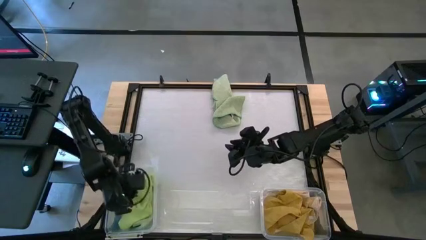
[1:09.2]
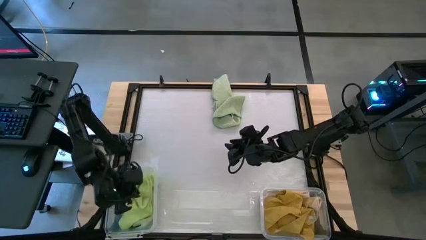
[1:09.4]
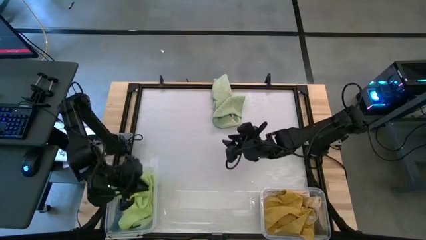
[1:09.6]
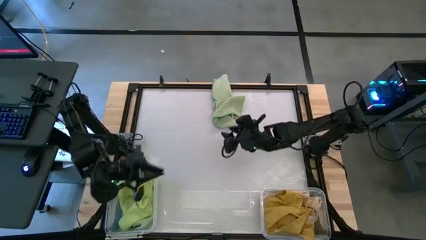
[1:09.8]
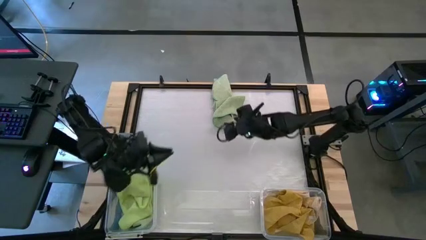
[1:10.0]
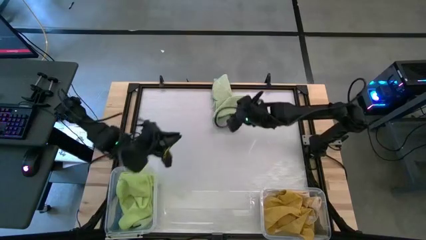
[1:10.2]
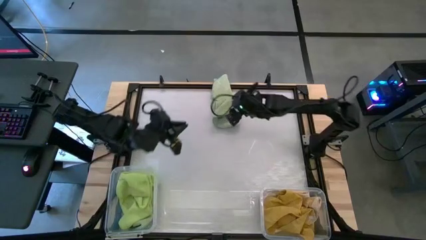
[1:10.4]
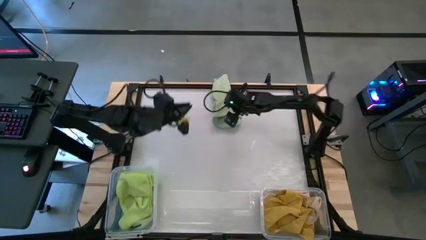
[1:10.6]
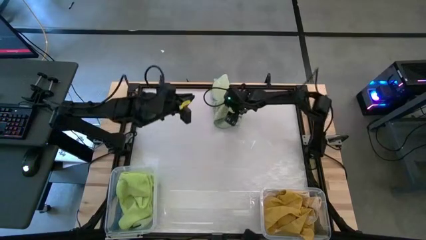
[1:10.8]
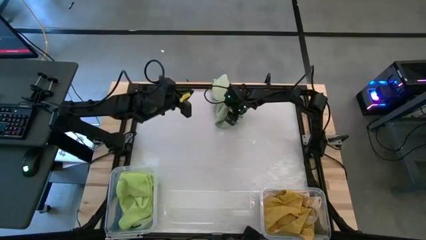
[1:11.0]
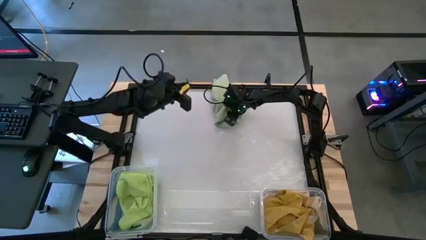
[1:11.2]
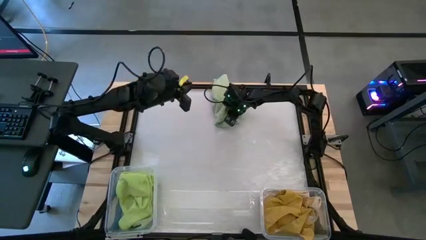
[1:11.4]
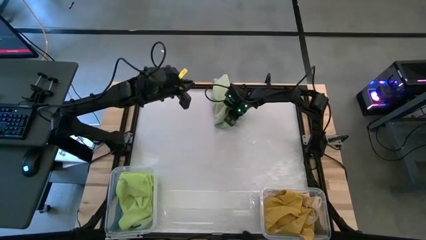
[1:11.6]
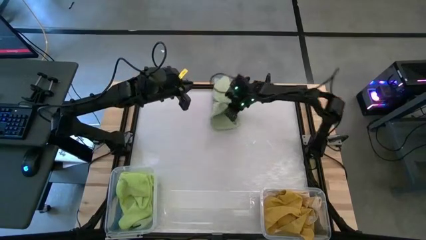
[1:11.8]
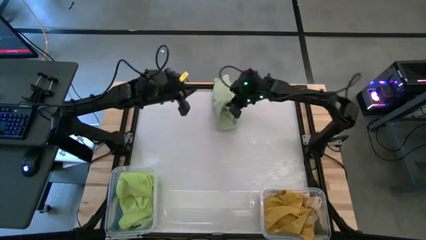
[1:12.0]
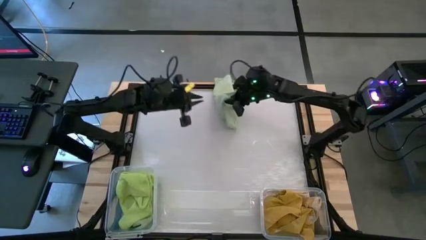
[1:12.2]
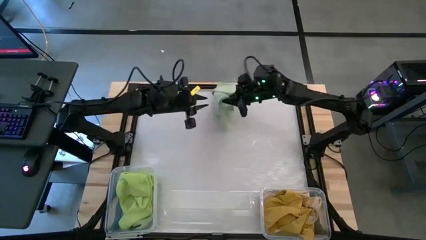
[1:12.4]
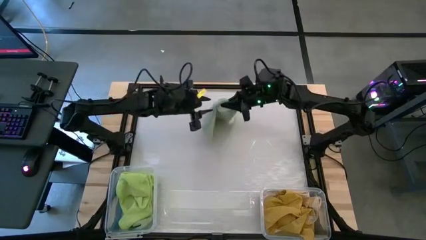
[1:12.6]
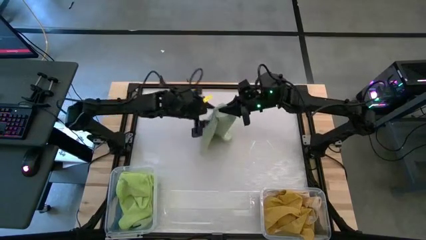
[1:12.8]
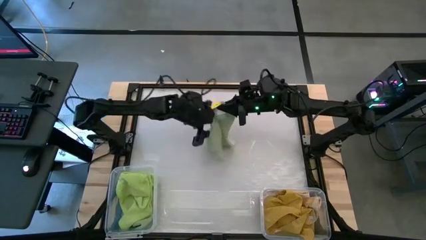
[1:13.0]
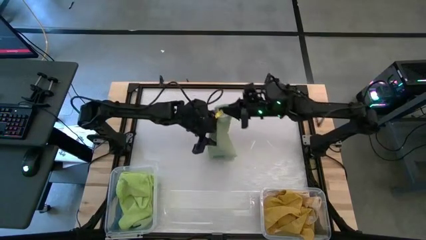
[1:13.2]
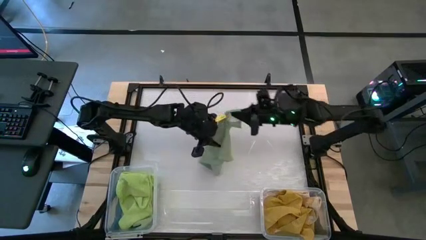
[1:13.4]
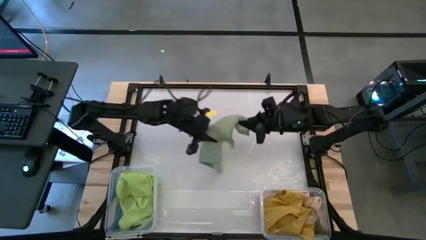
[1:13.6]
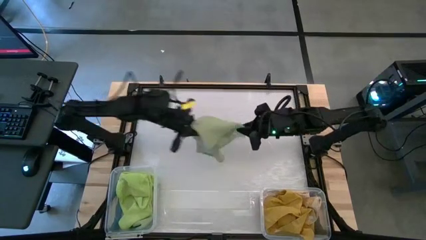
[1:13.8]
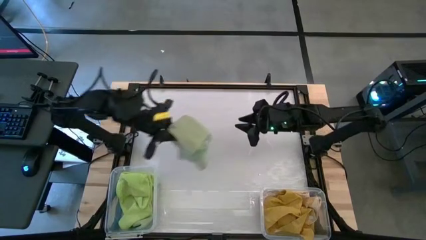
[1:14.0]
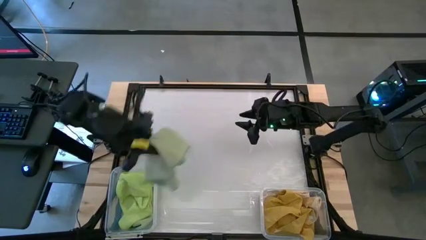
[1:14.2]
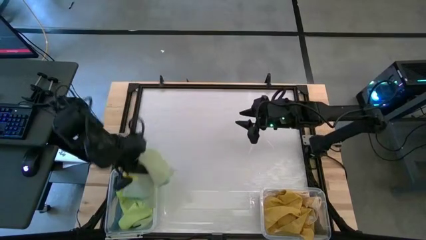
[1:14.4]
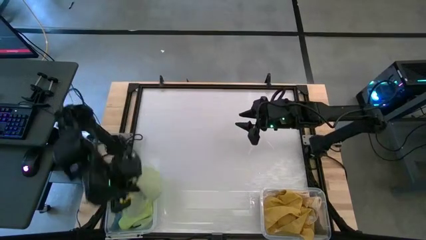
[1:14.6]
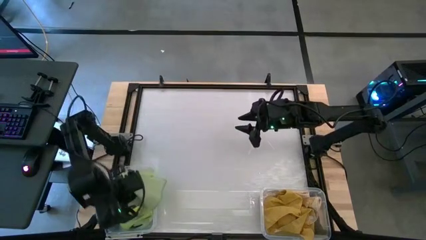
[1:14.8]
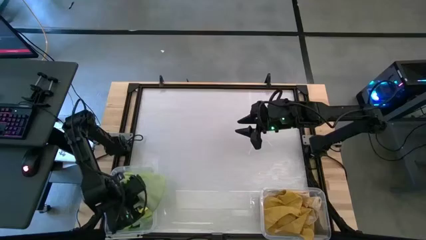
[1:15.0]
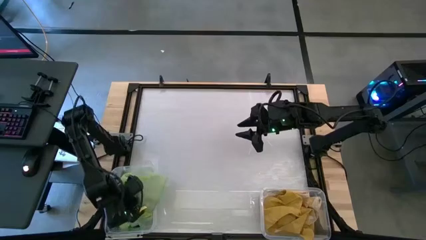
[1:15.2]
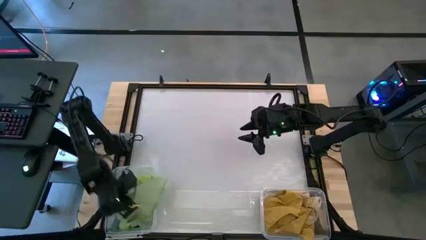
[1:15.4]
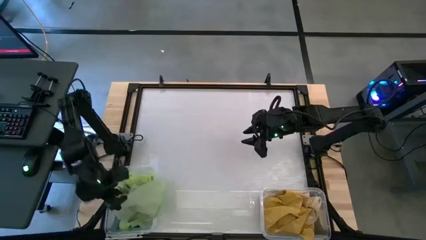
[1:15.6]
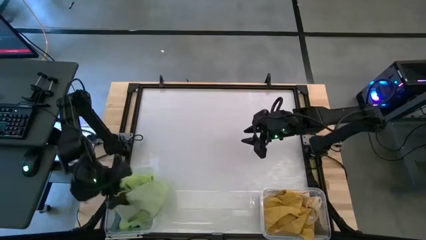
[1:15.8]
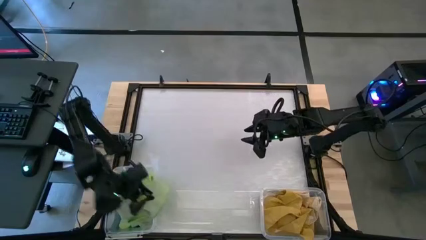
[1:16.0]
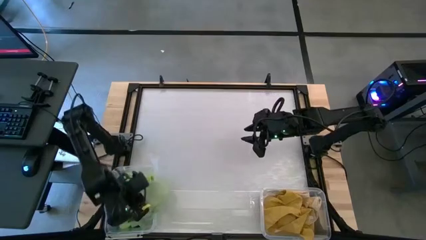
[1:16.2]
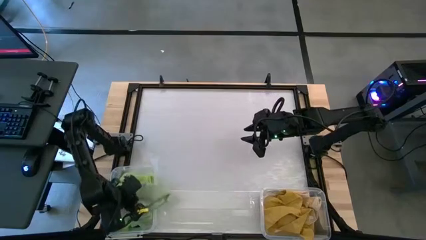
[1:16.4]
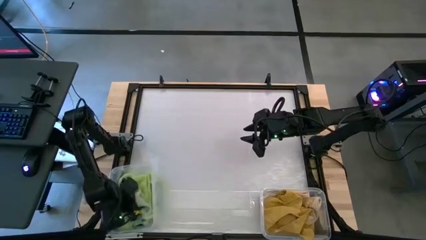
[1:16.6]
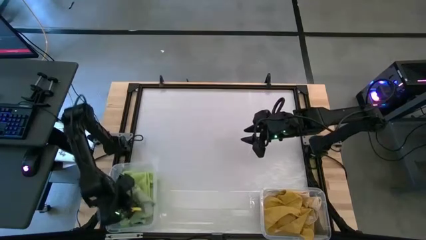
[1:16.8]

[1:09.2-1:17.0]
Task: Sort microfiber towel by color & place in baskets
Put the dark green microfiber towel into the left transparent bin

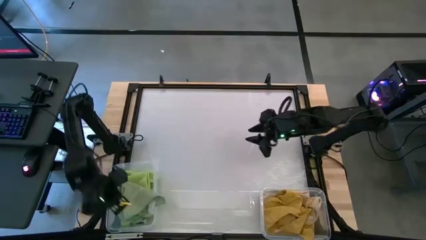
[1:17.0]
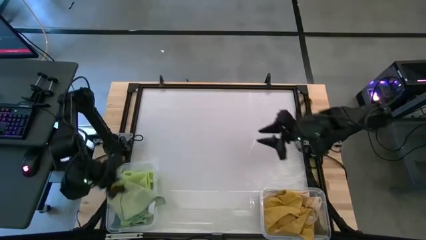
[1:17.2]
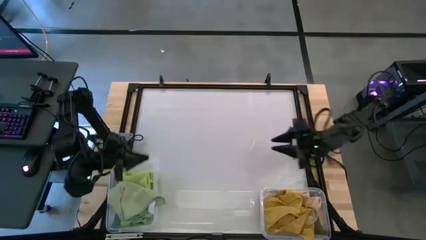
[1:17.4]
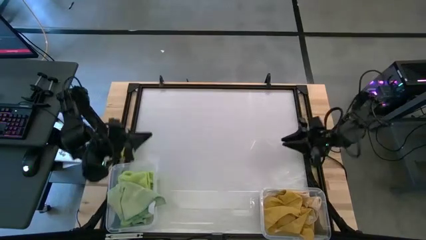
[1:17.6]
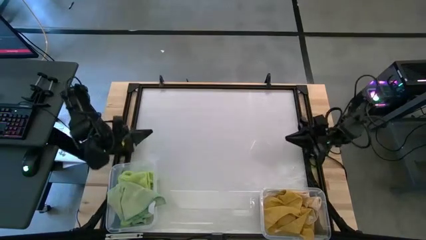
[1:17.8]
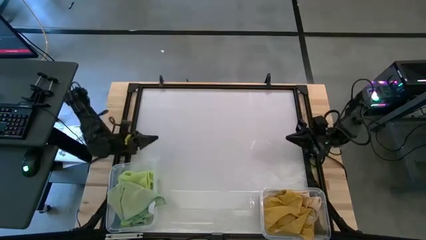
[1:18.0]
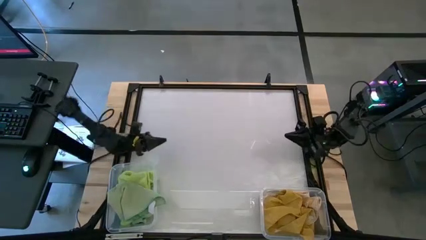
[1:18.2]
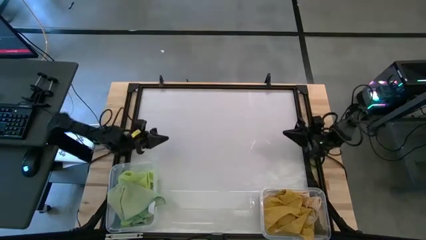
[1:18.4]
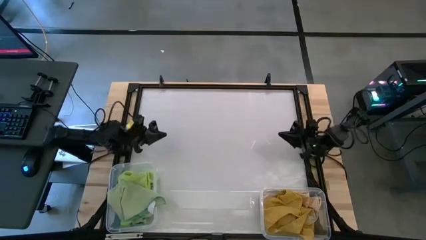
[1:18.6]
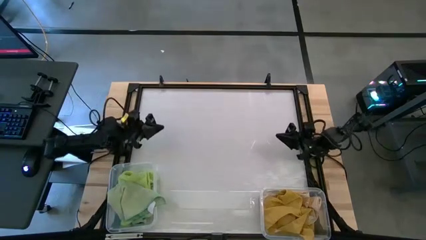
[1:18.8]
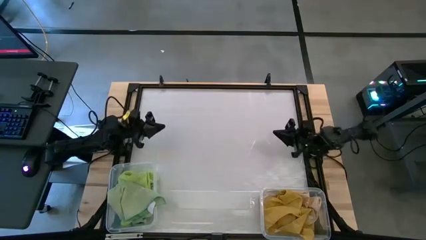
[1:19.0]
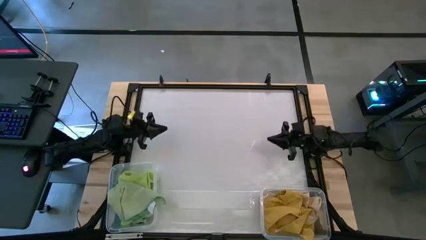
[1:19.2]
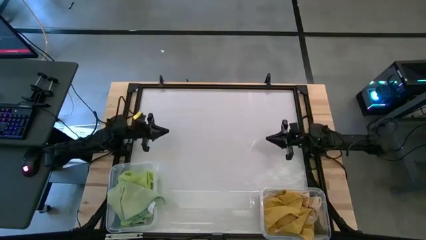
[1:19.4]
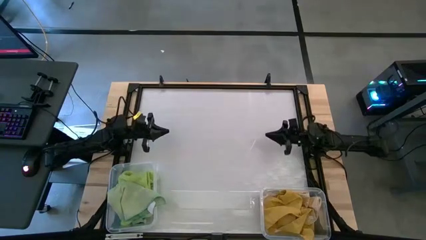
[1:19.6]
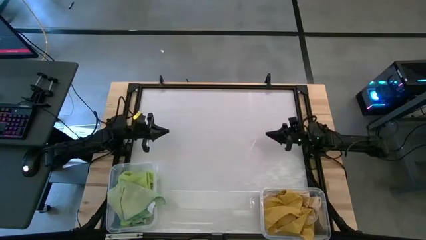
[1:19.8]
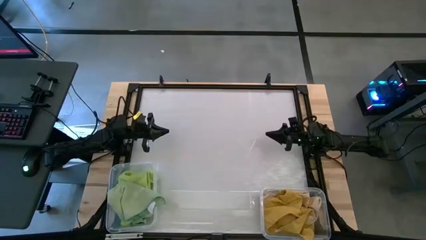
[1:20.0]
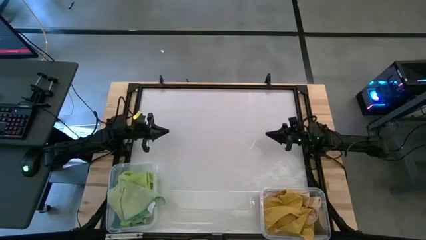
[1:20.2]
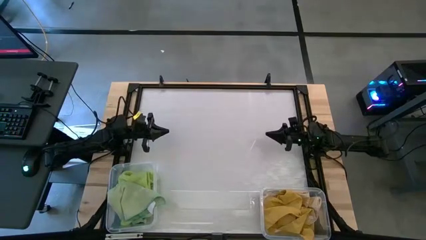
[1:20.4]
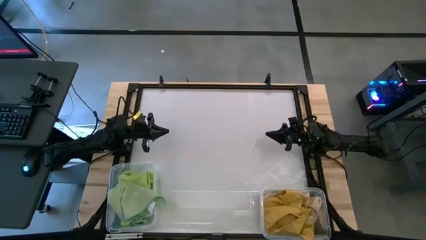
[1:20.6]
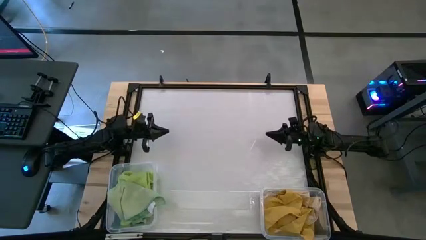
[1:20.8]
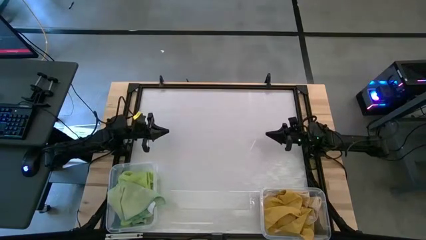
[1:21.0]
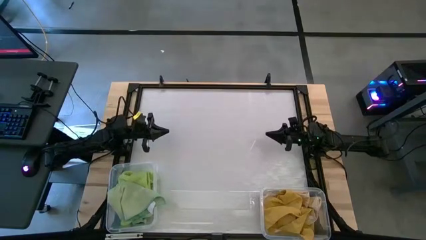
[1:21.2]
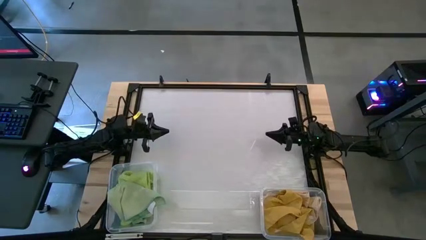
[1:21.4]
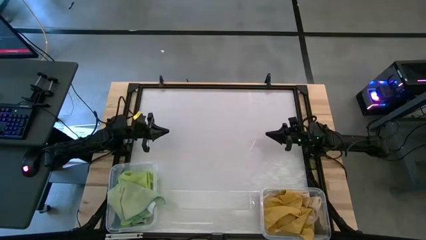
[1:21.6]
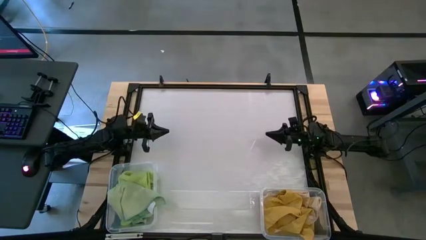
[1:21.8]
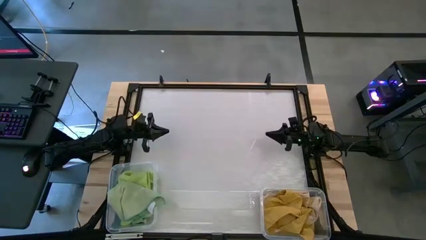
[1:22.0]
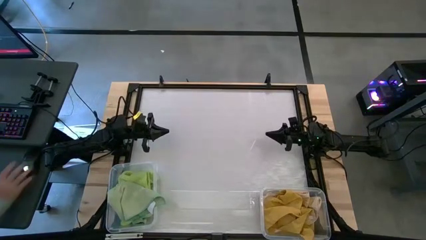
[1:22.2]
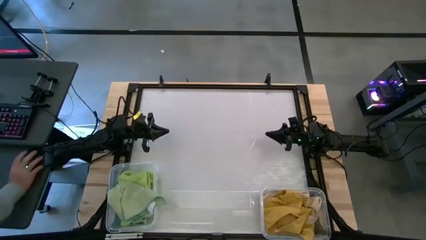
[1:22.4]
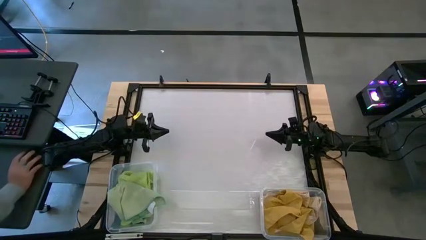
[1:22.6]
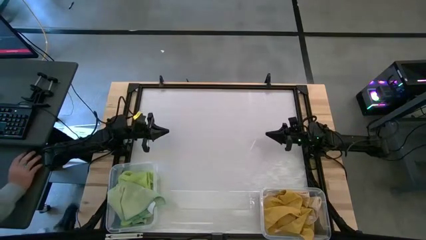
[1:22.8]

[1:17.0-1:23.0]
Return to Home Position
